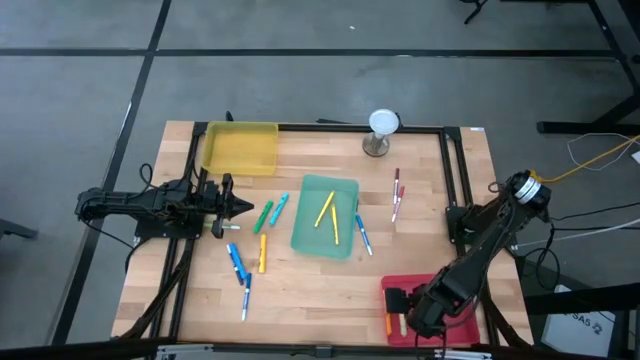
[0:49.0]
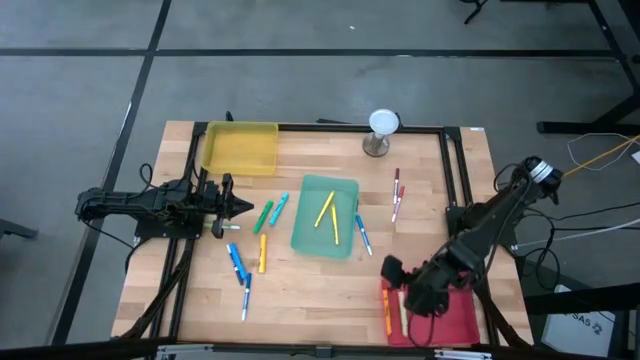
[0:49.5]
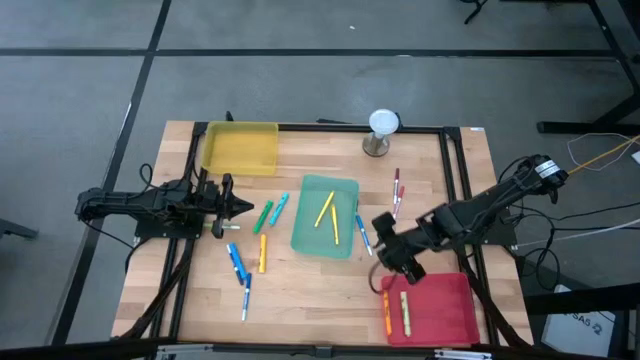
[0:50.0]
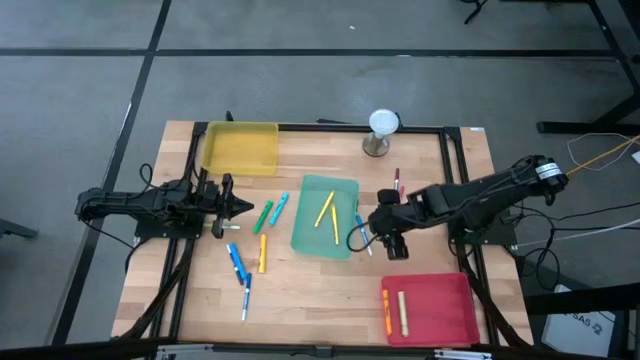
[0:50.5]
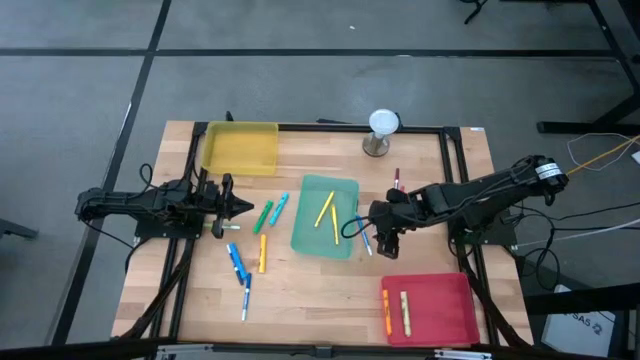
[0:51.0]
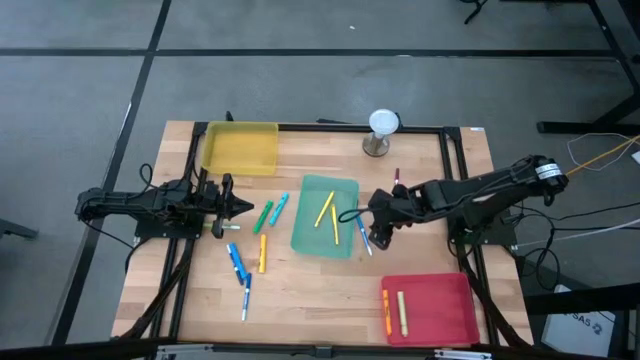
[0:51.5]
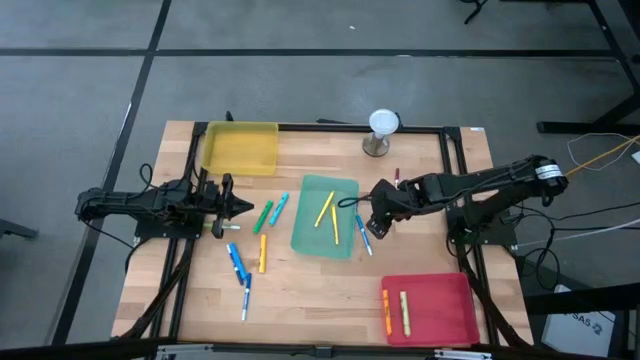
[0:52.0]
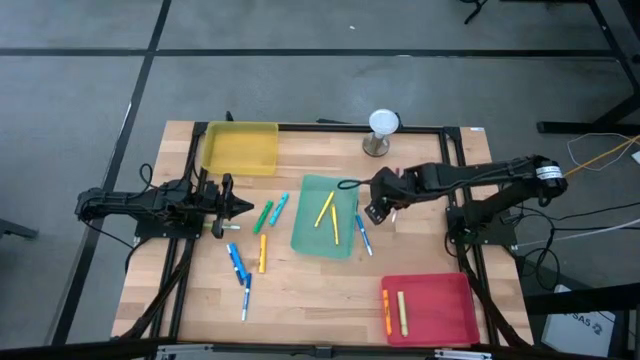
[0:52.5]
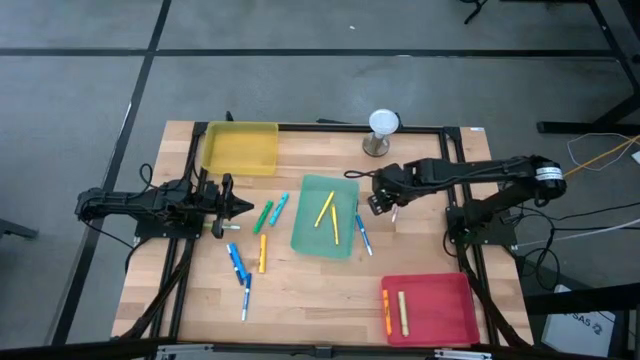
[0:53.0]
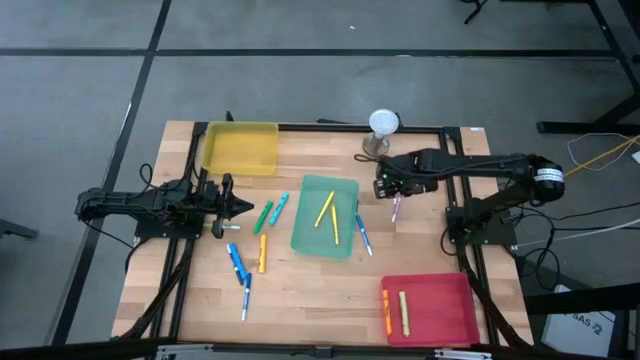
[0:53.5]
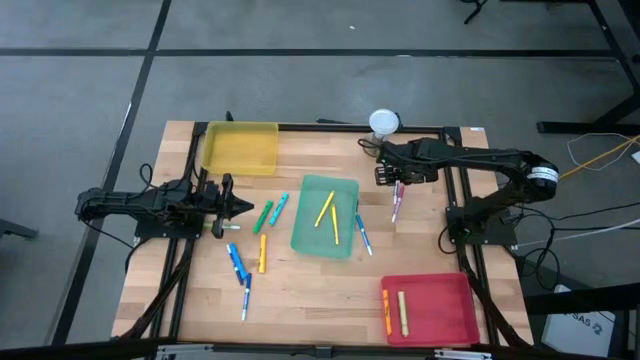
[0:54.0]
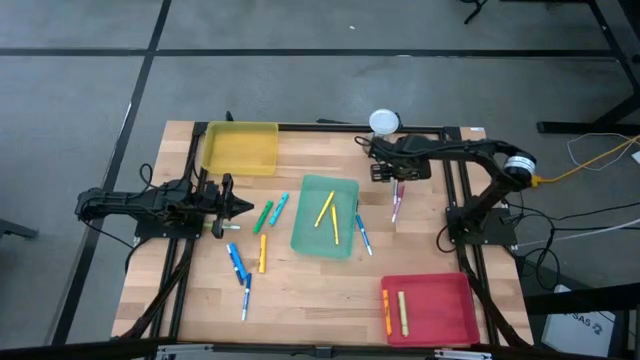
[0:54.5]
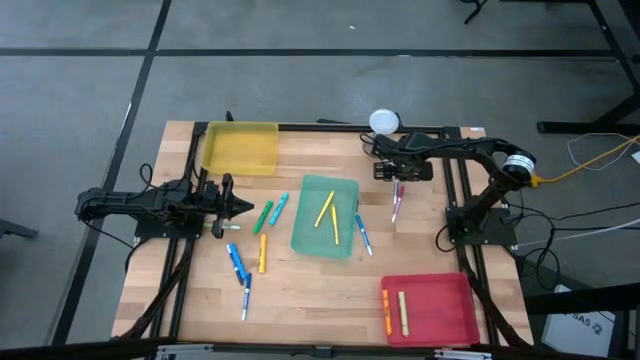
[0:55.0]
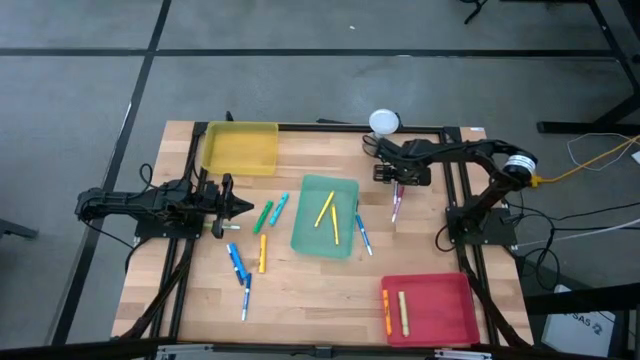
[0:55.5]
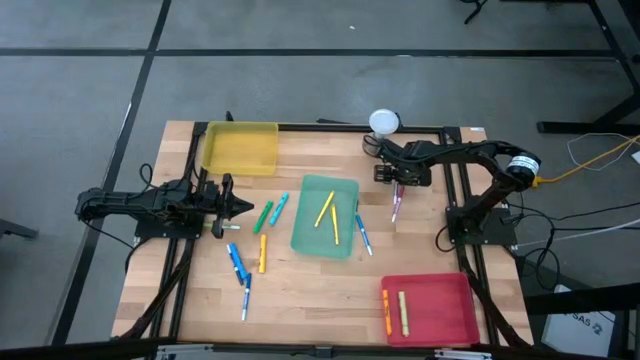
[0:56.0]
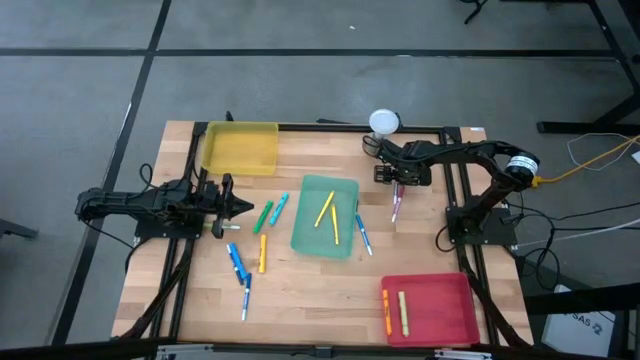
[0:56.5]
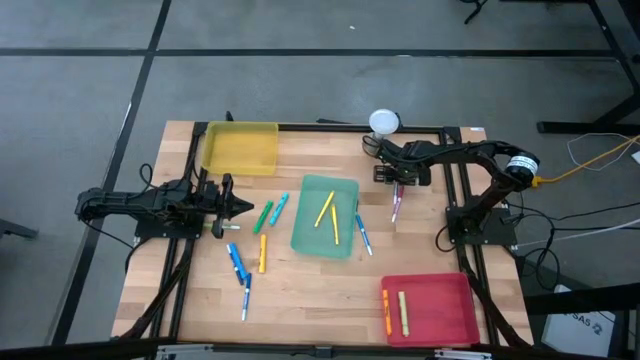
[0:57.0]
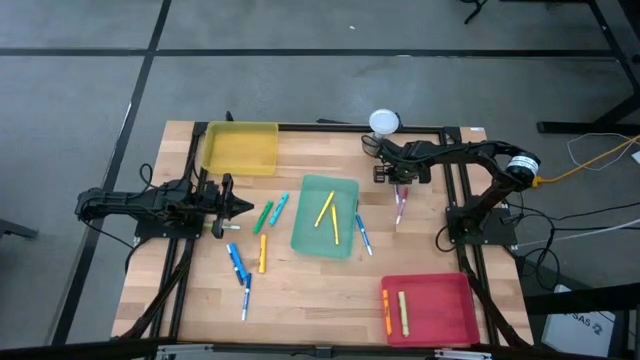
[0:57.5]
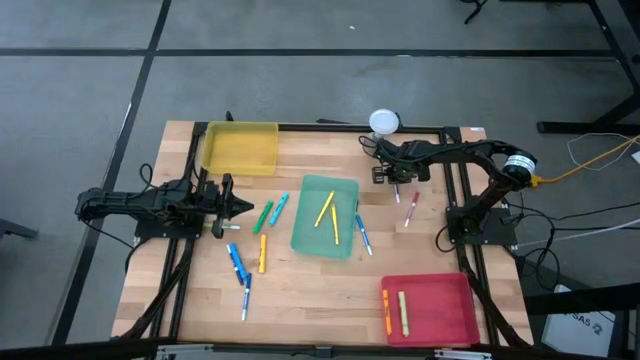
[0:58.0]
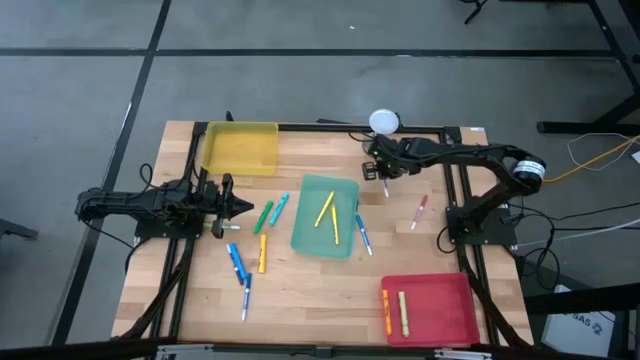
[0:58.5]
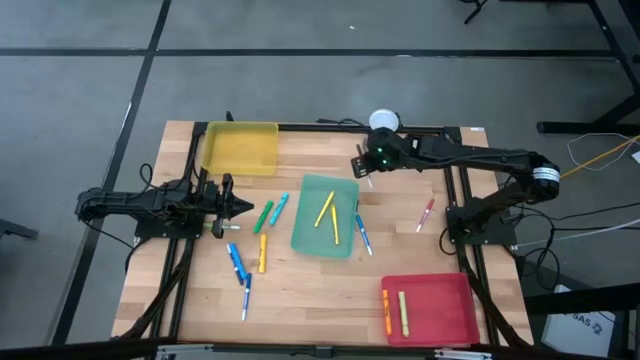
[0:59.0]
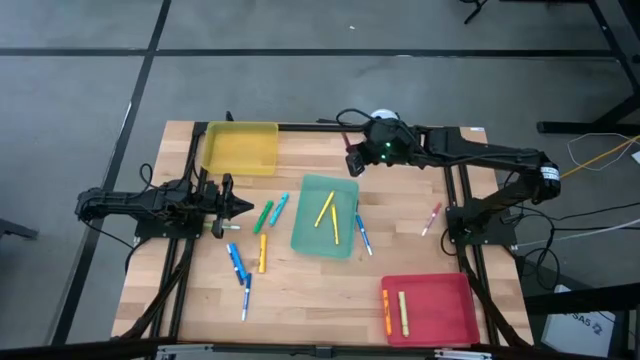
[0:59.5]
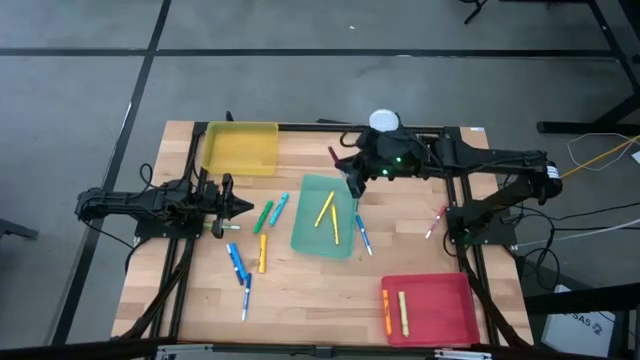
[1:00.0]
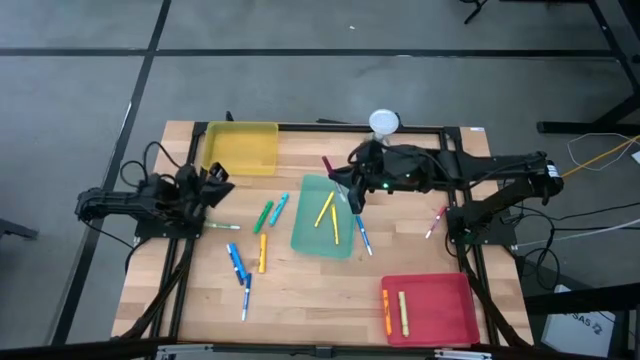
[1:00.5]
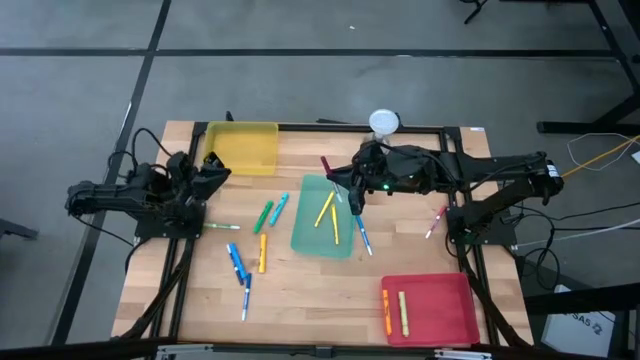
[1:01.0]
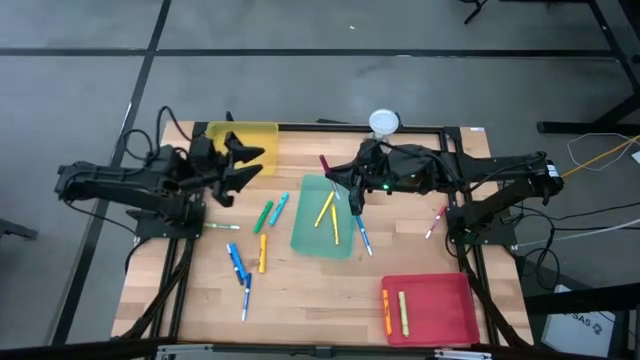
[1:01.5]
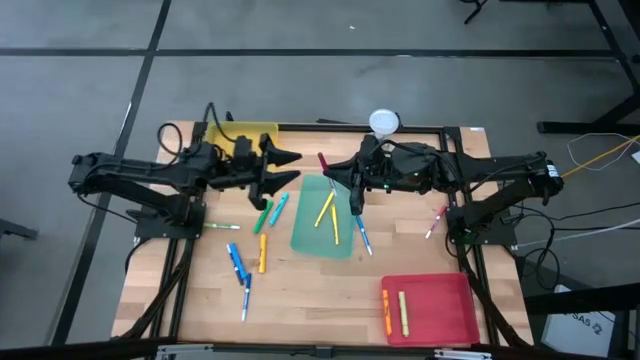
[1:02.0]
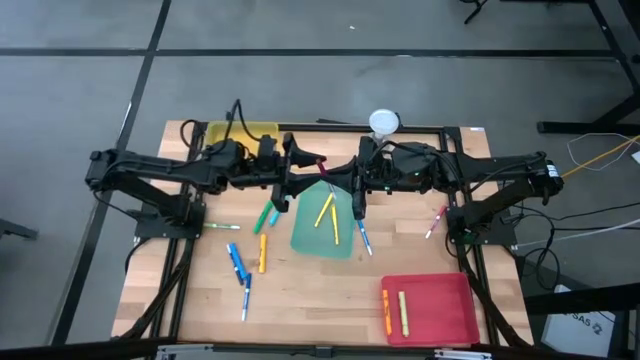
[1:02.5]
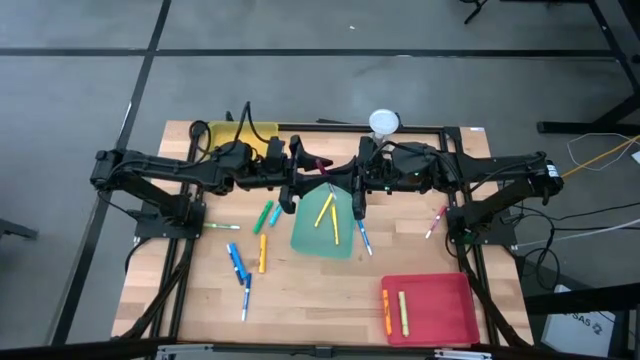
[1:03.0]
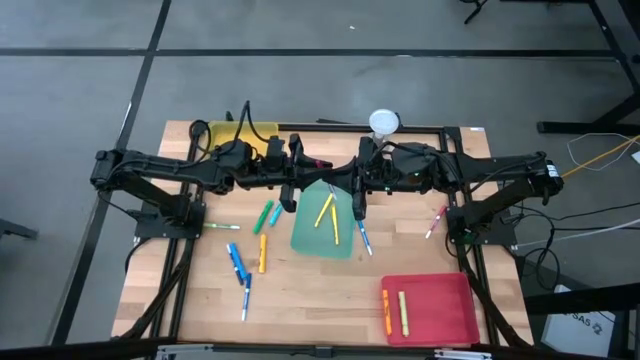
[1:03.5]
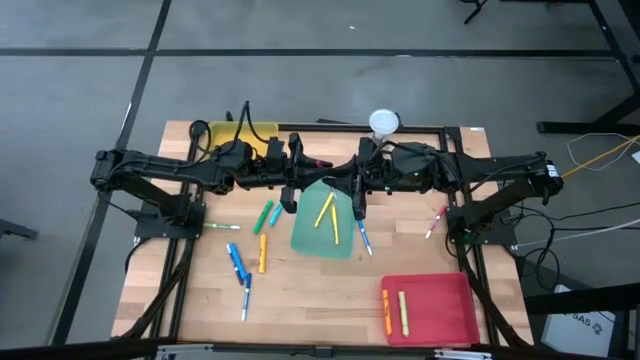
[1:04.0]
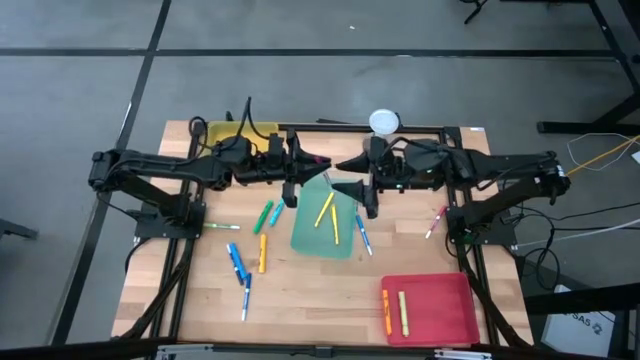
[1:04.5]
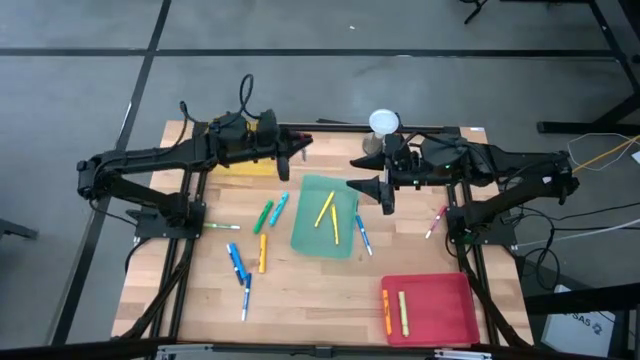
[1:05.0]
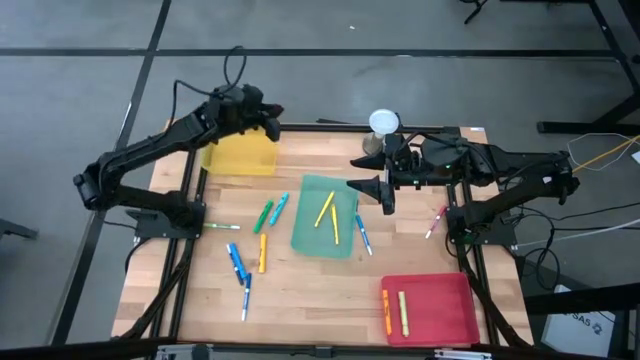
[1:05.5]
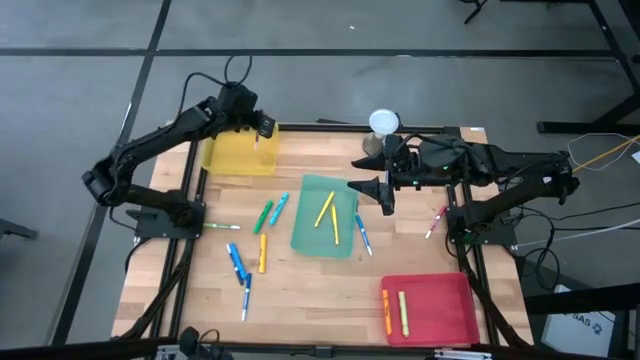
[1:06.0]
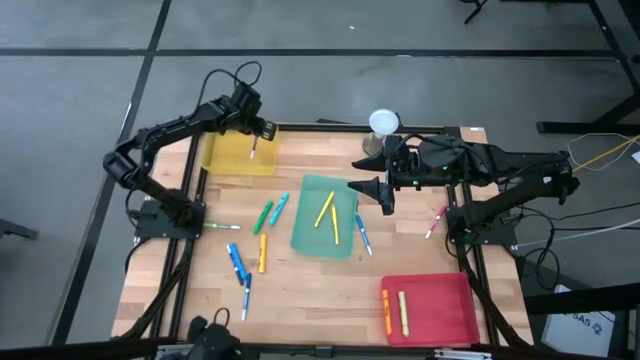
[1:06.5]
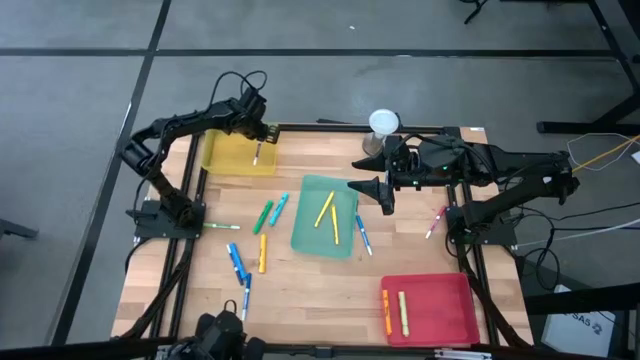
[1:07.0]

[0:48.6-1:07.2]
Task: Pick & Place Markers
Put the purple marker pen into the yellow bin

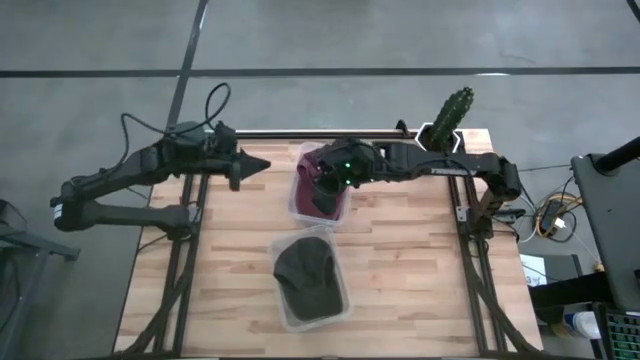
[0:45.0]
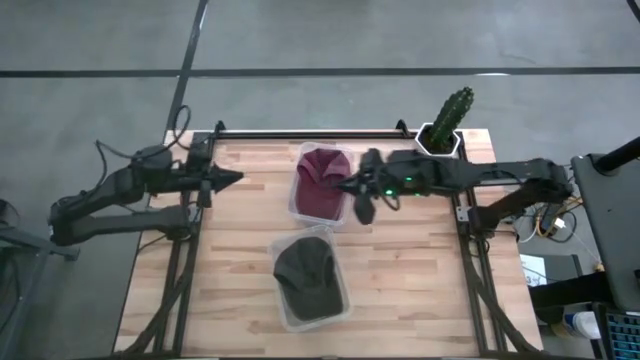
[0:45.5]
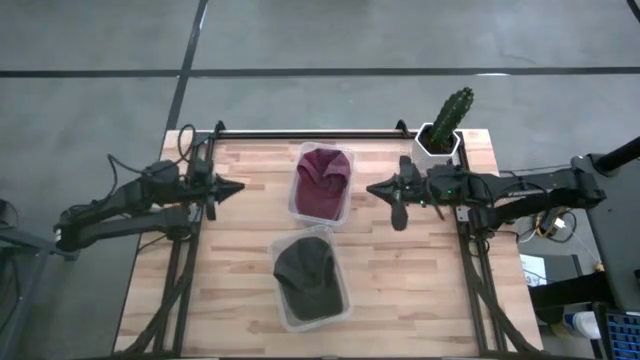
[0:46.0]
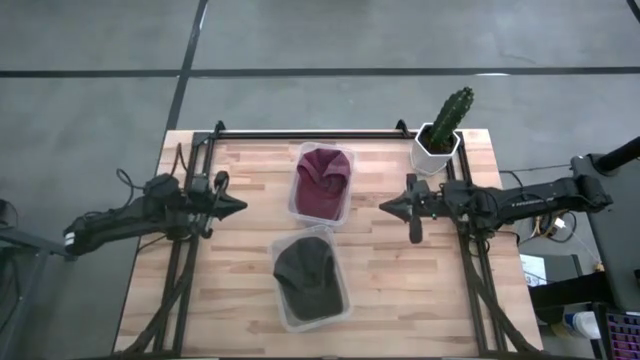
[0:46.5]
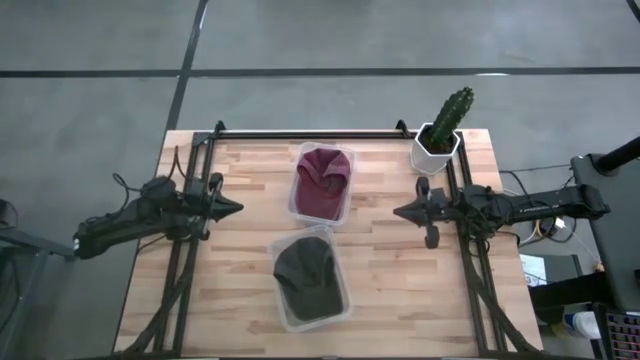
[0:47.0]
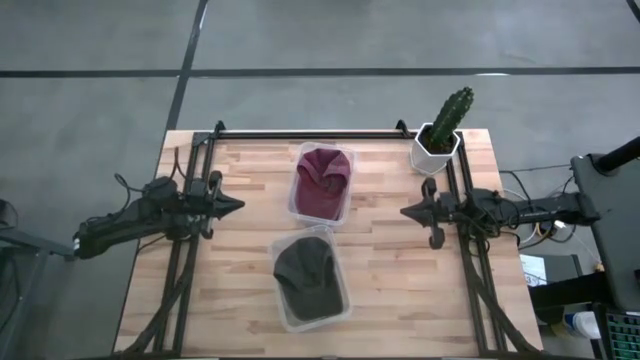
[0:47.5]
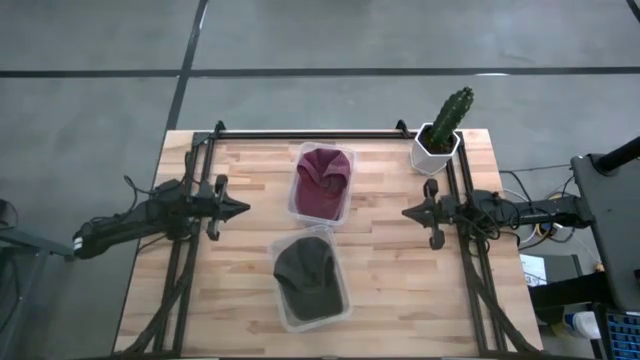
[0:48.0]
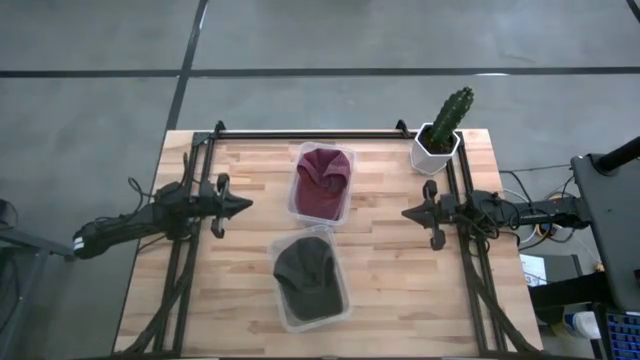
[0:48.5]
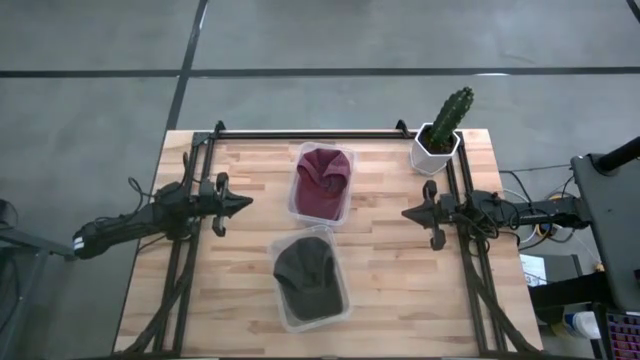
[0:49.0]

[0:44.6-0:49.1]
Task: Pick & Place hat
Return to Home Position
